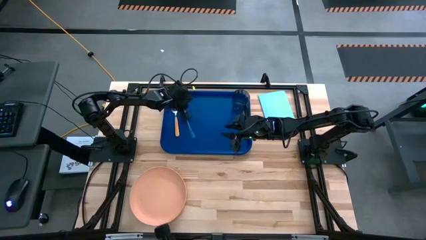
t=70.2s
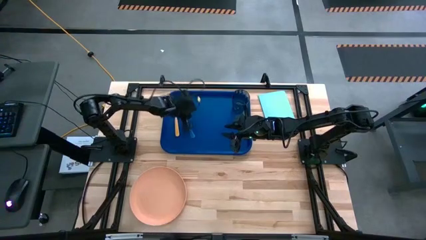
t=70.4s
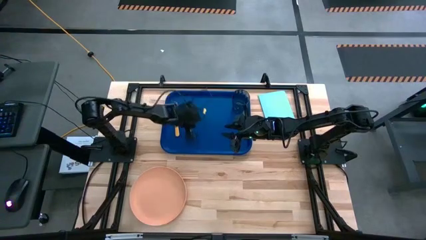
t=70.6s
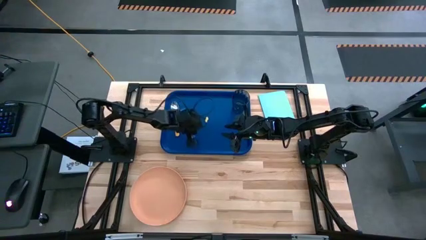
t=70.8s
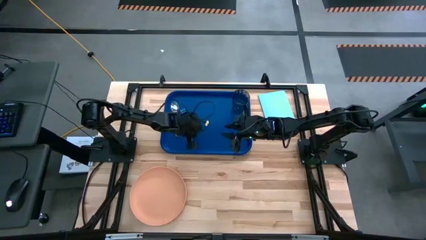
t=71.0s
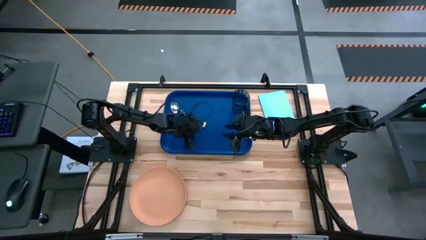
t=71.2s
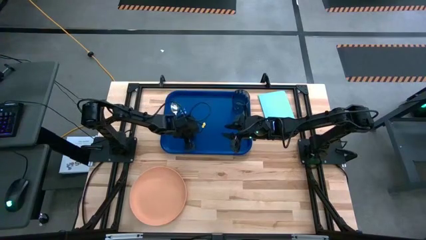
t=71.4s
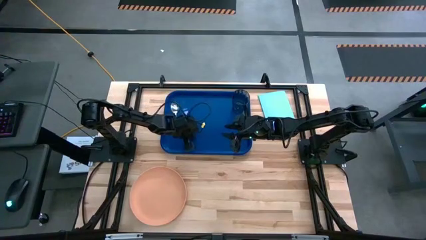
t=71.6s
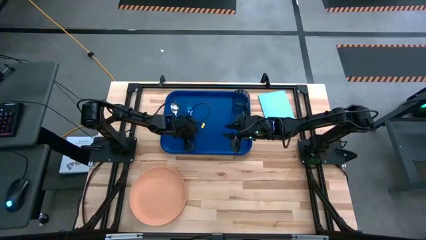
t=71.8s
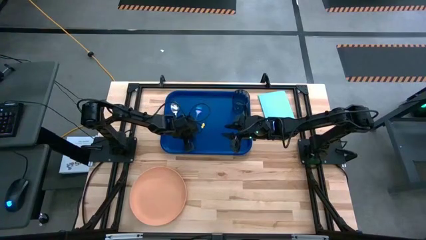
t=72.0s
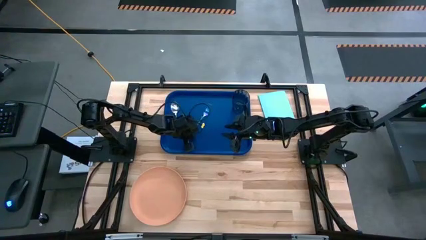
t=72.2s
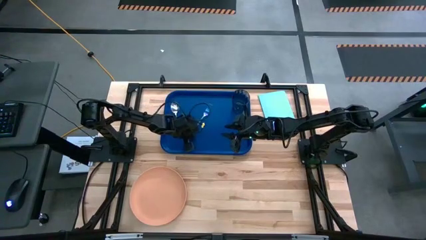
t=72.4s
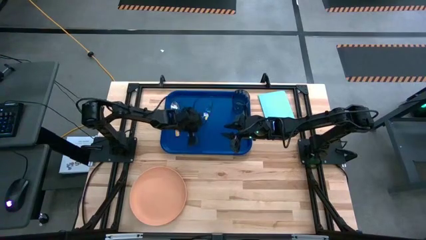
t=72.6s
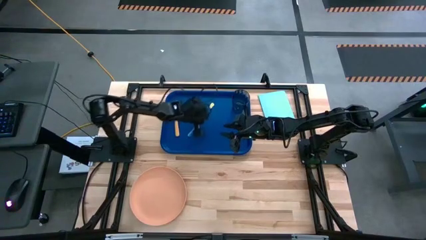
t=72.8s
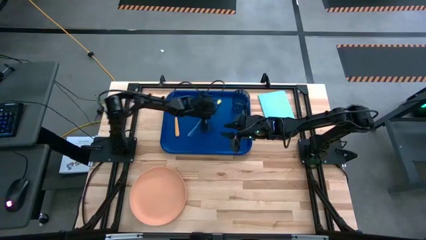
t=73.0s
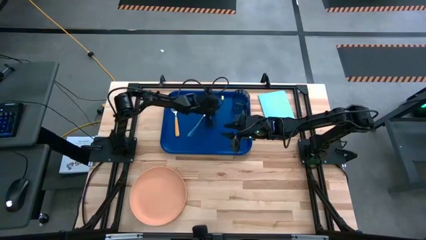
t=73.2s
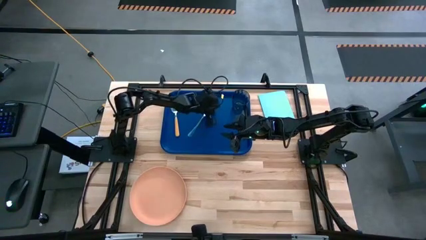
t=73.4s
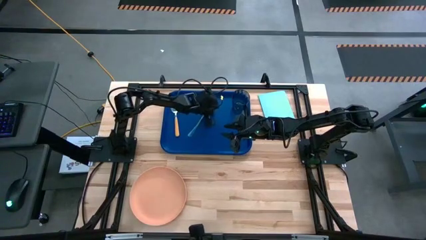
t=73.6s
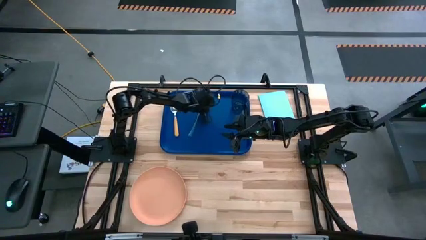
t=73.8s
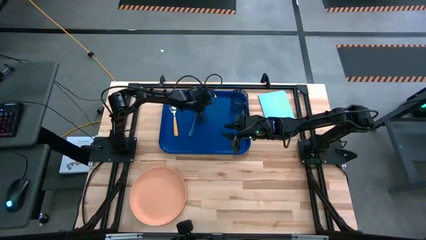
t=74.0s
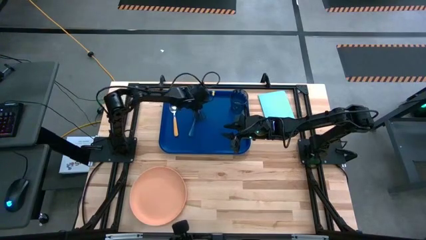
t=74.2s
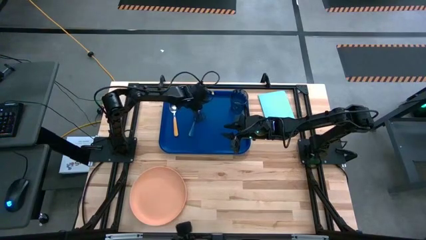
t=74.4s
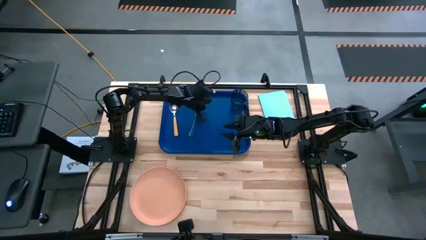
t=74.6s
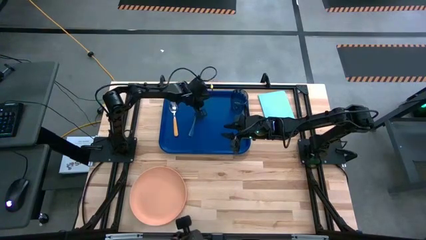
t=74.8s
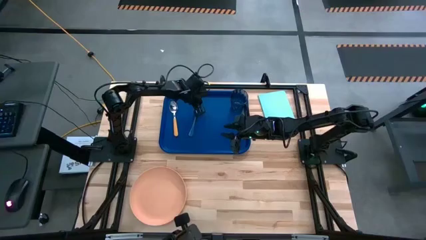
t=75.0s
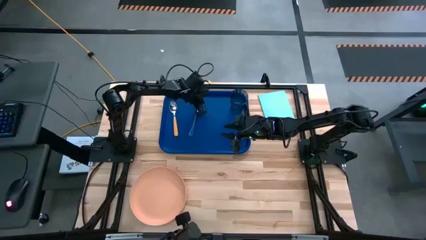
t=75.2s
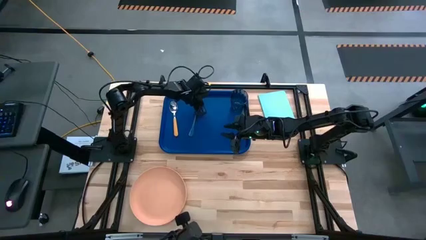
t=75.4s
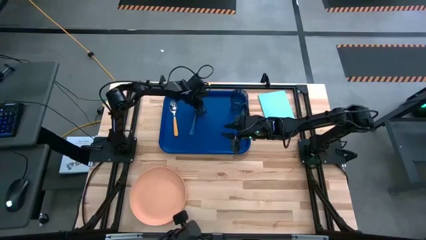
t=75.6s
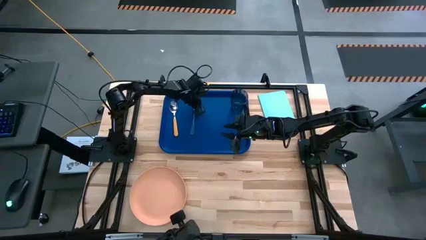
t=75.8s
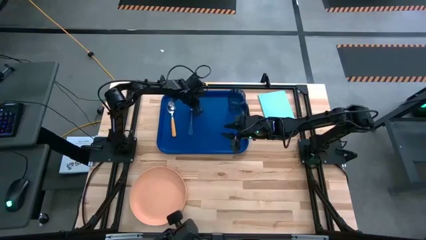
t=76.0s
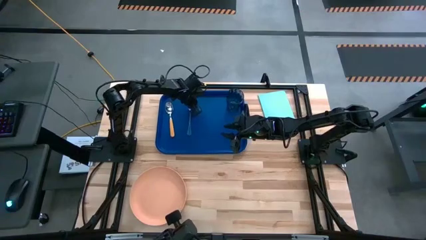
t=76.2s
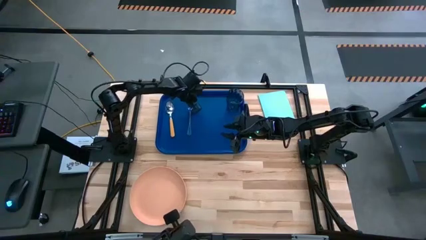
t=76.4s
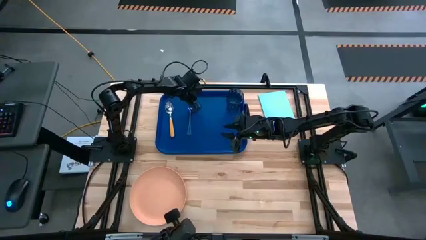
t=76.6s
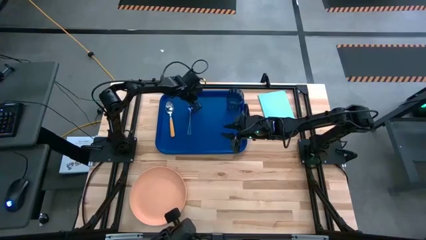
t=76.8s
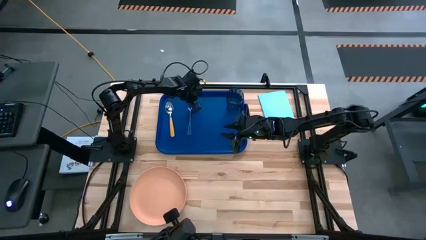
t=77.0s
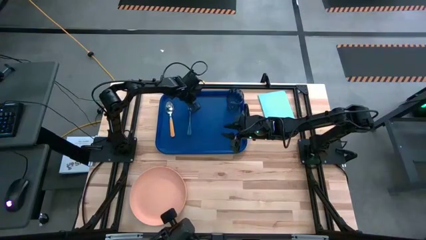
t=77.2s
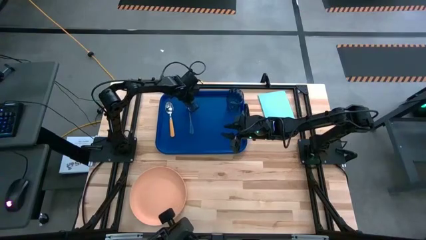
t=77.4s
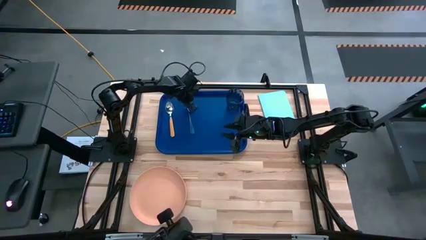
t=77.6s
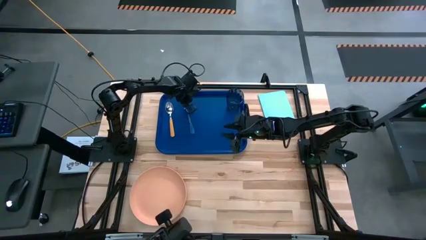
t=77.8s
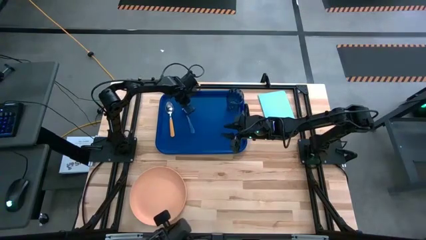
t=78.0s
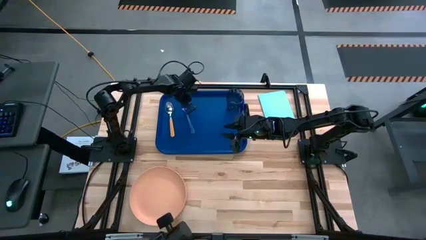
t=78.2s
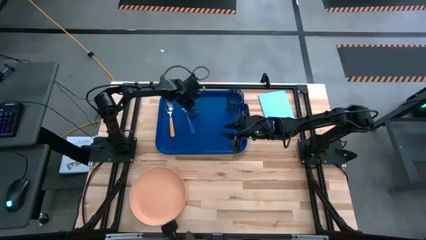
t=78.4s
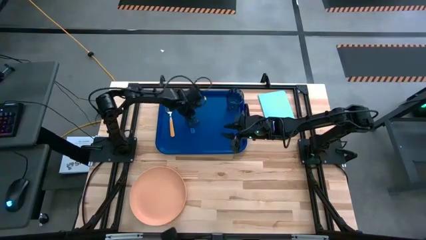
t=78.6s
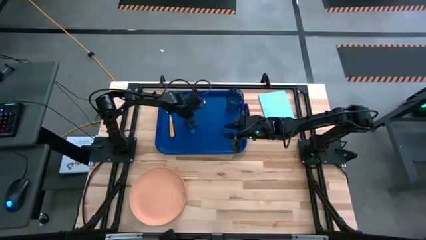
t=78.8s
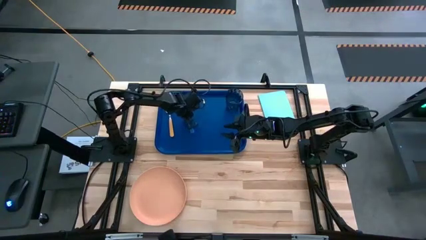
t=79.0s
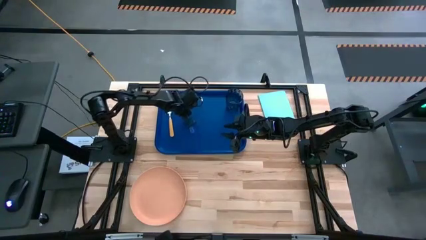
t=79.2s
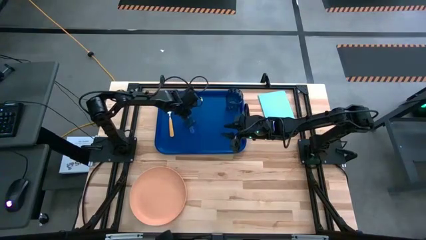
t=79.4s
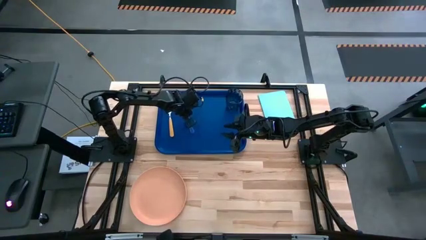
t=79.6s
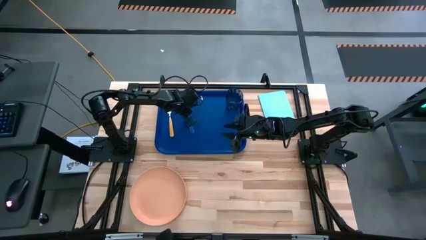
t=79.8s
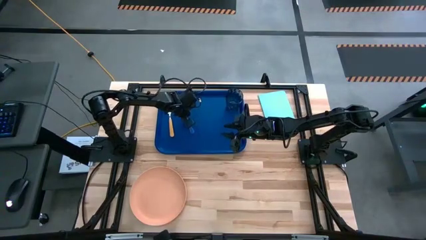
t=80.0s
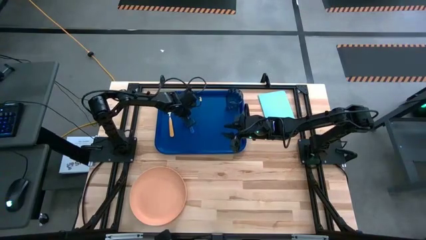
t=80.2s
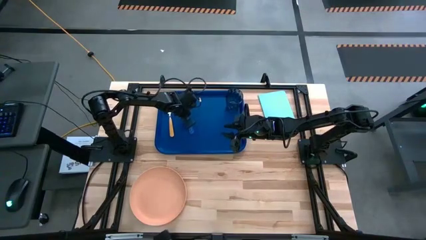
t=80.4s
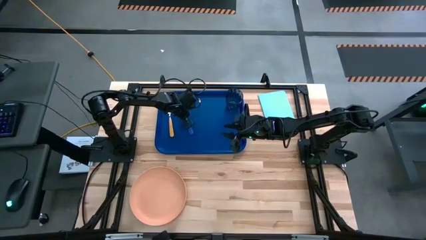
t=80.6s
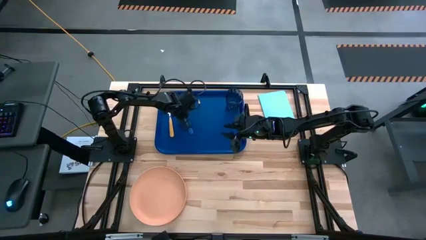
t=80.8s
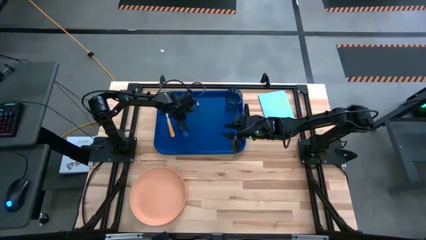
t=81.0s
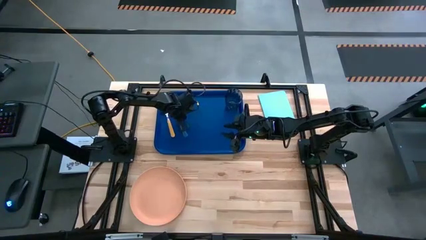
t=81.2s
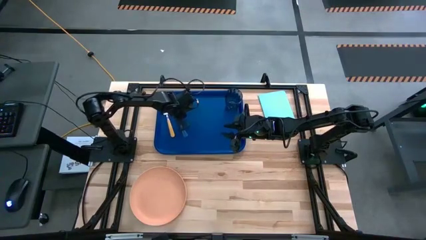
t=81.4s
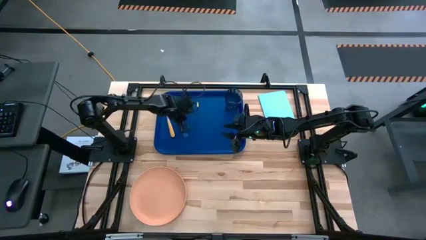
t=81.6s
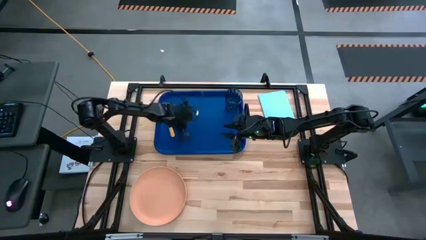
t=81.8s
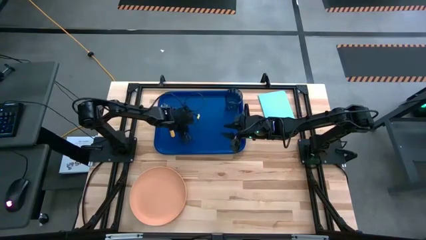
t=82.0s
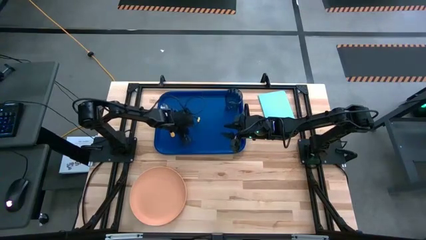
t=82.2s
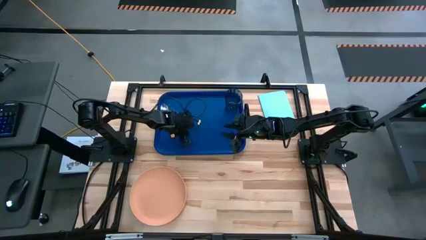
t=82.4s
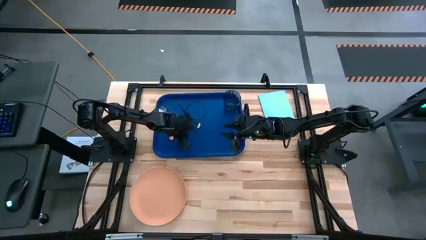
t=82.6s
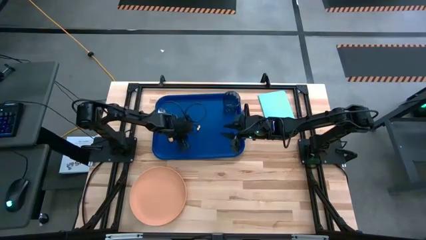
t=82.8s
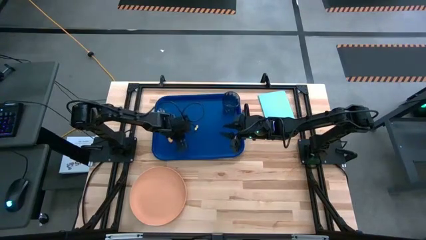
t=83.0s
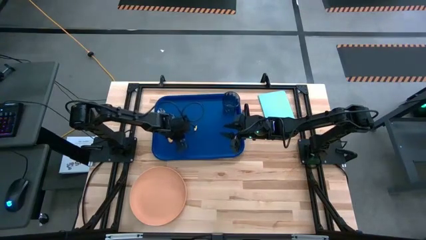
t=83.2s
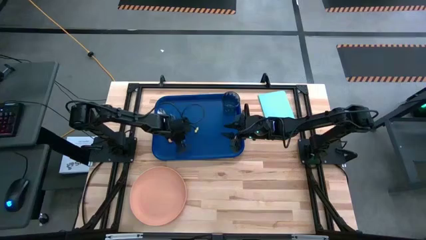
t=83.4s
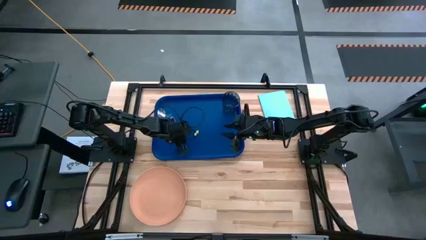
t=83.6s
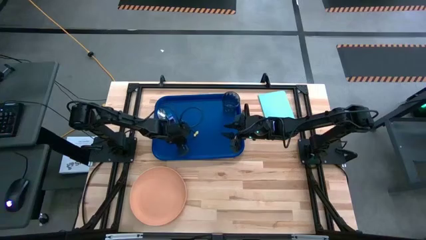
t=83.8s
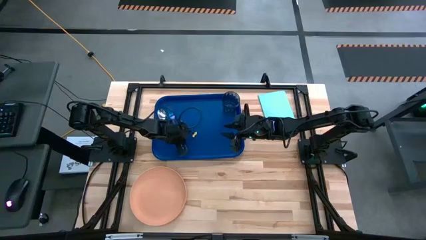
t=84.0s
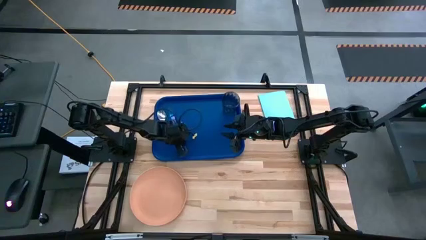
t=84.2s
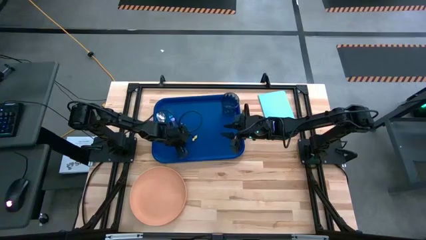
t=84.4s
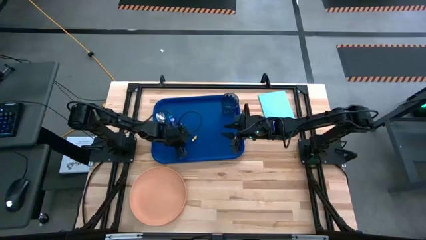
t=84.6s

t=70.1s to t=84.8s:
Task: Pick and place plate/cup/fork/spoon on tray
Put the blue fork to the right of the orange spoon on the blue serving tray
